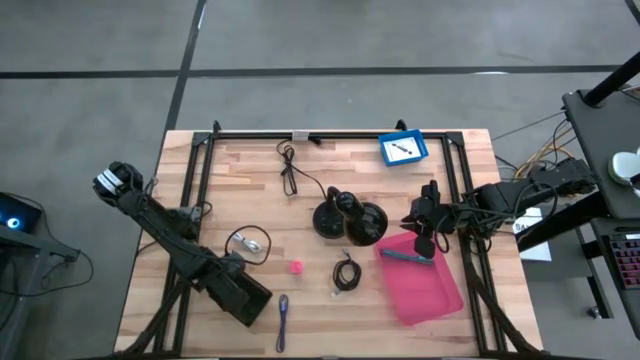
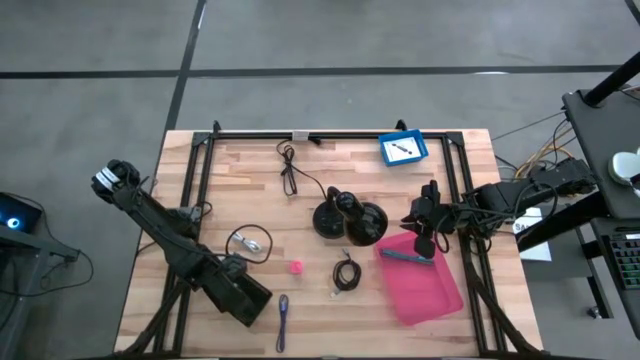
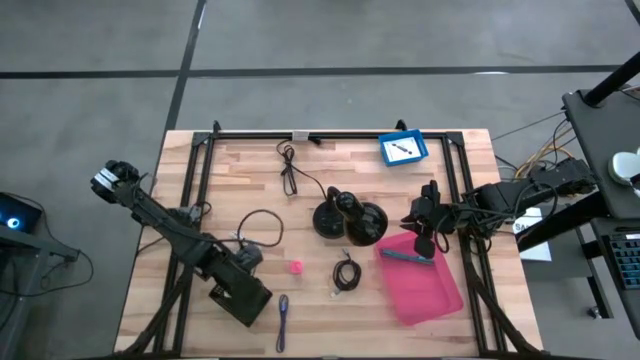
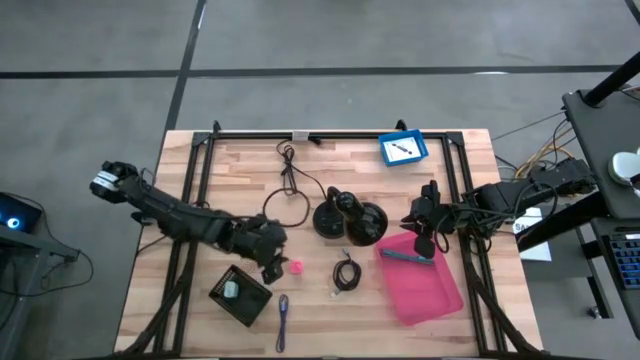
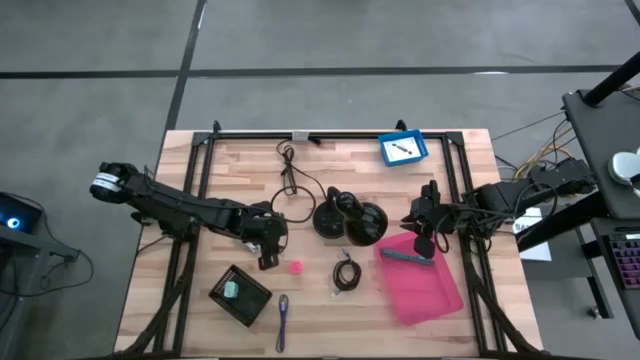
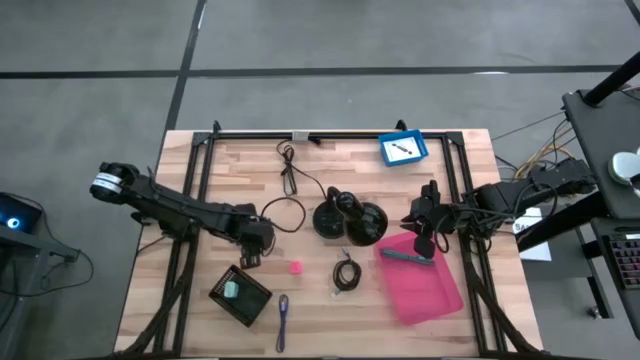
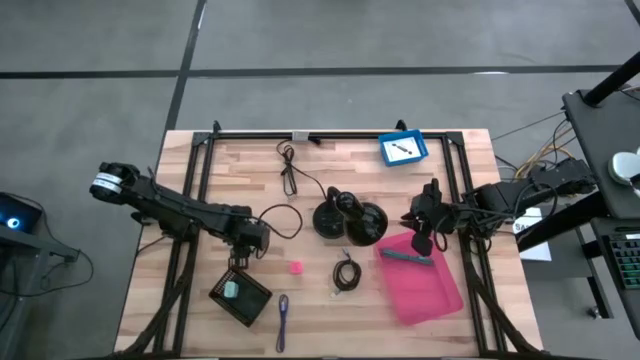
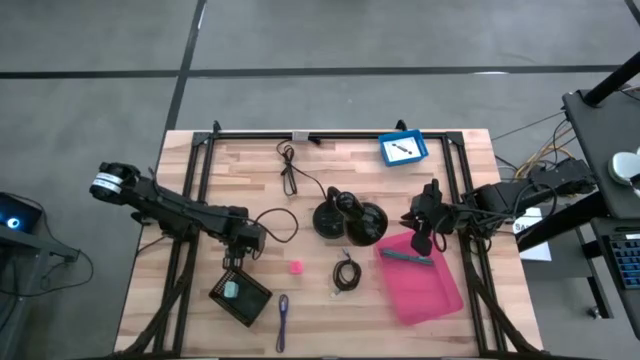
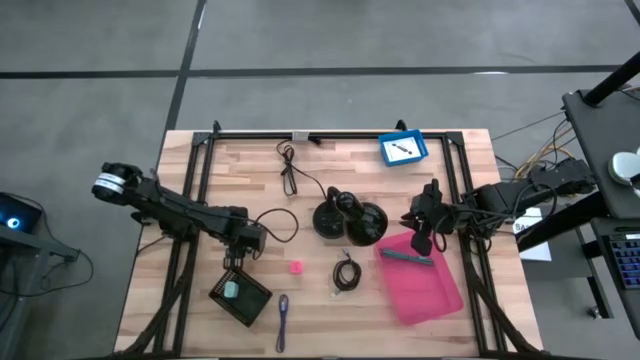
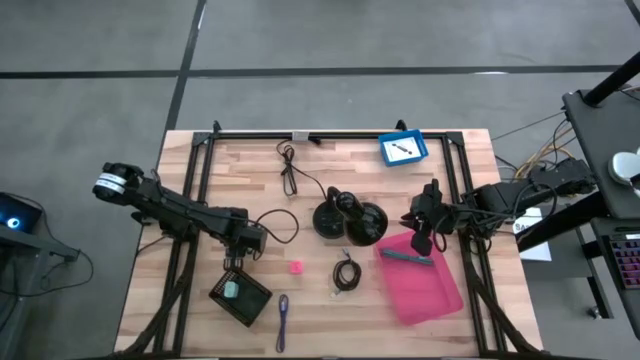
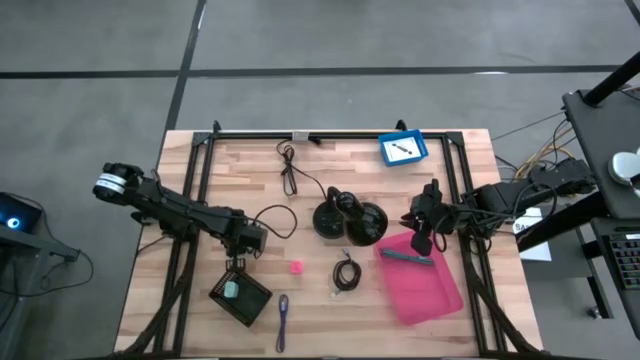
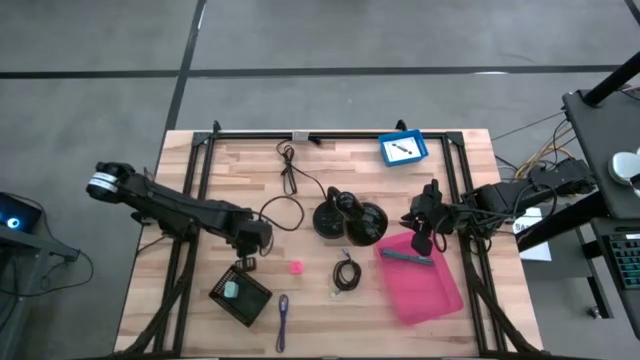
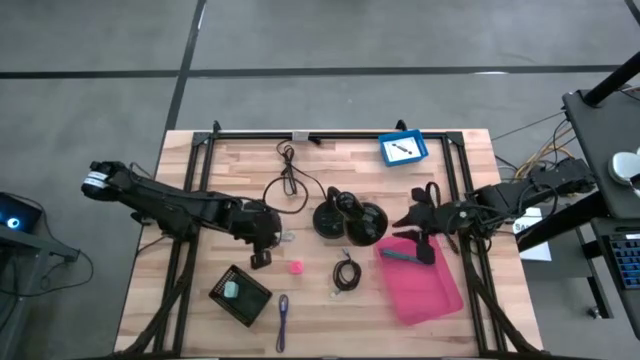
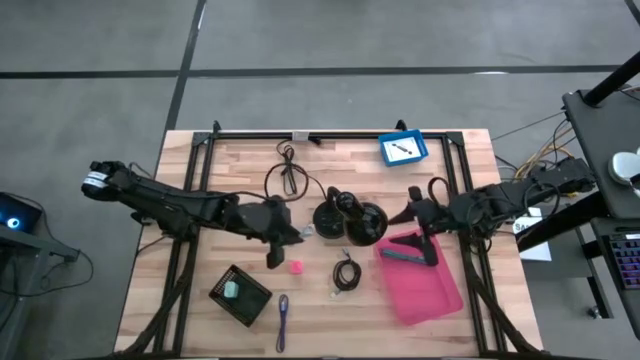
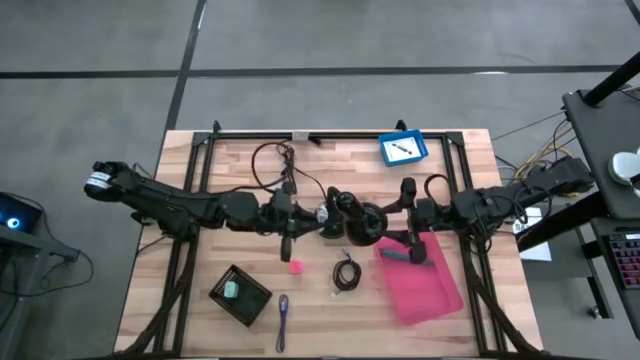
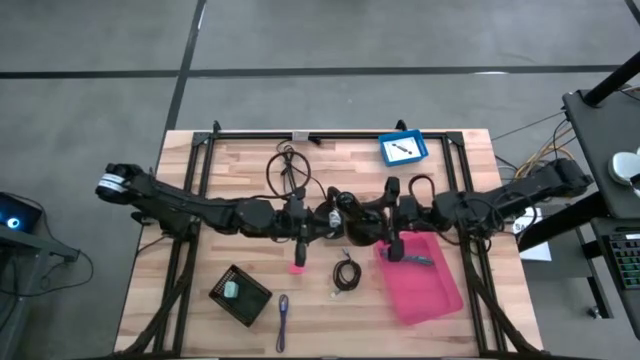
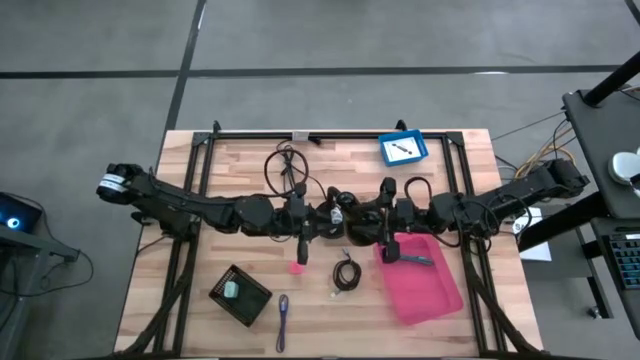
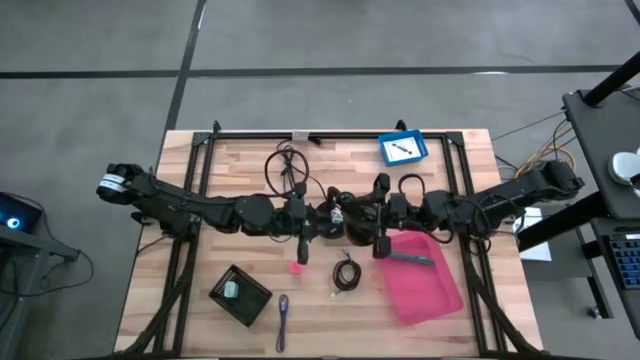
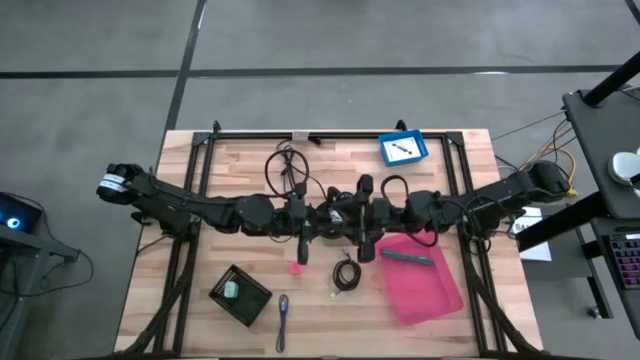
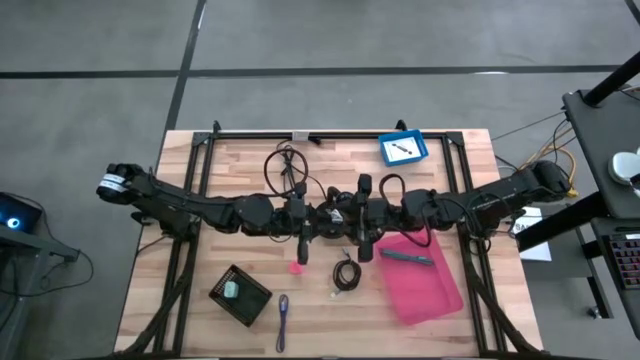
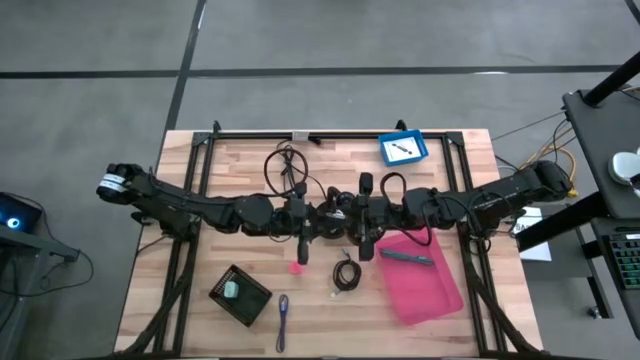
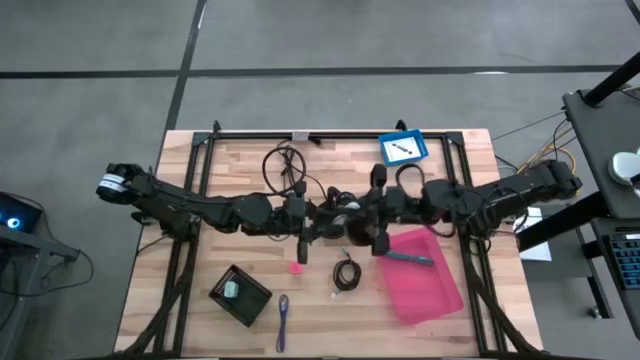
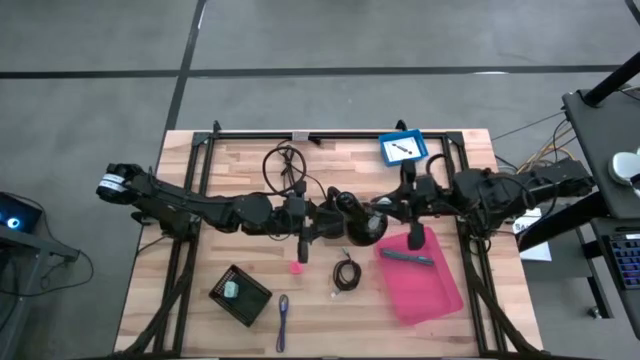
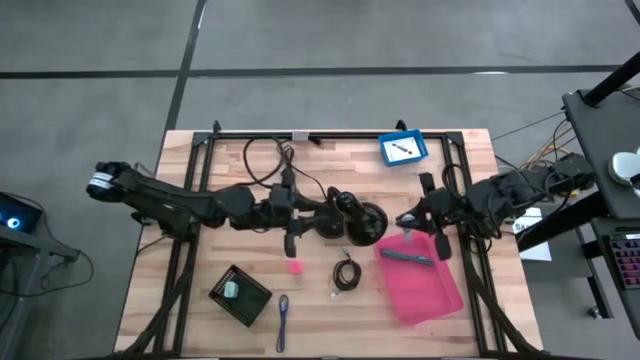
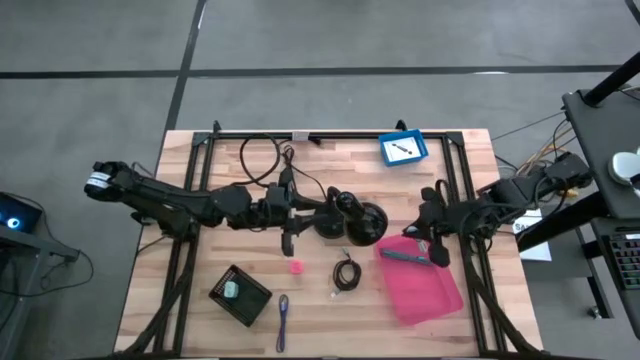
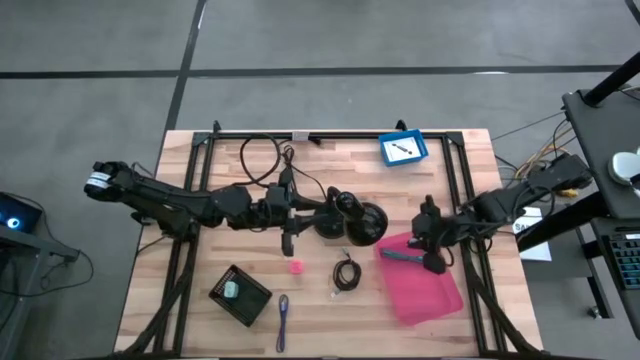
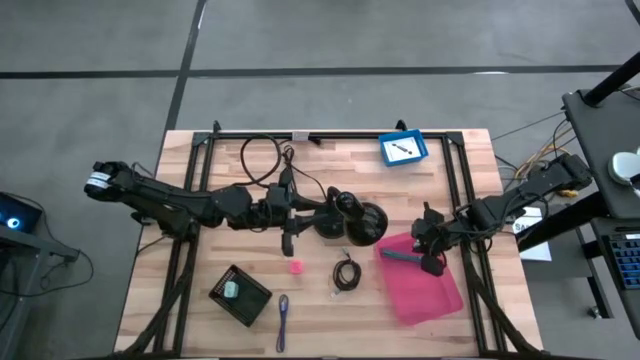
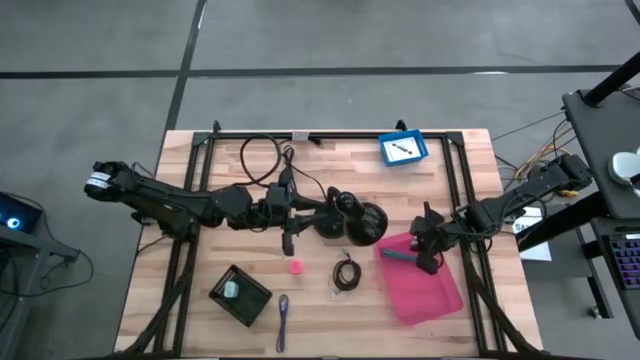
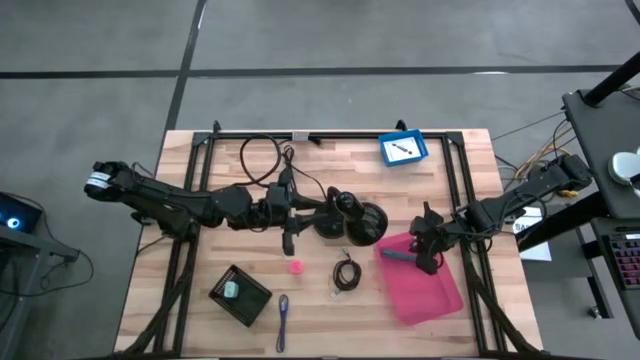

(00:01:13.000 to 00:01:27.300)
Task: Pick and place items into bin
Put the white charger cable into the pink bin

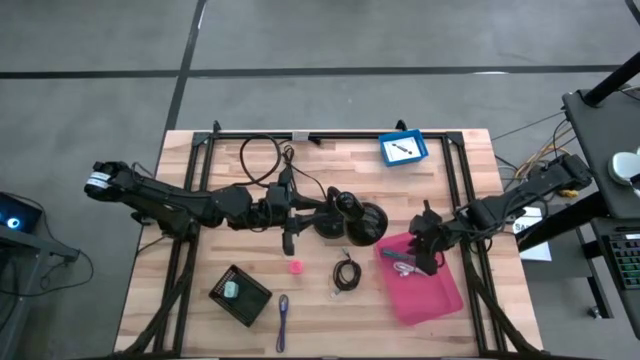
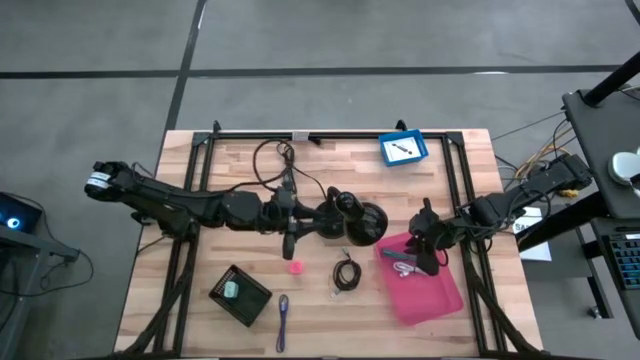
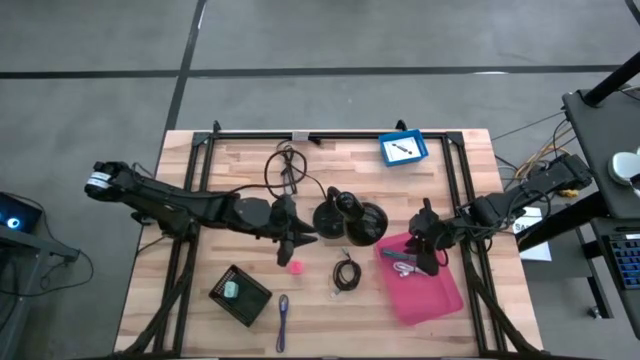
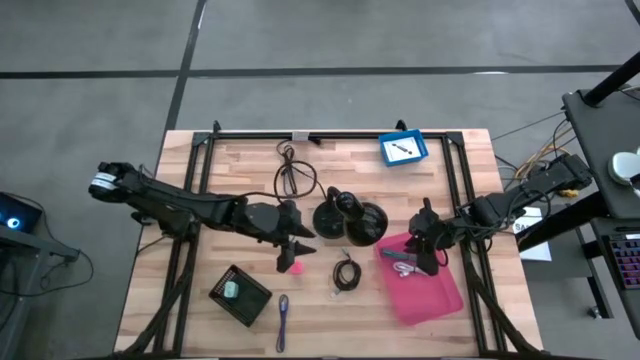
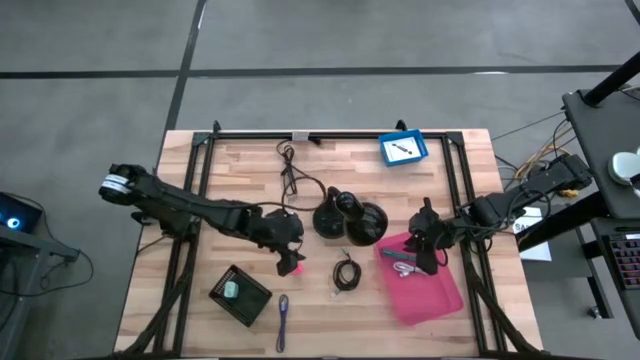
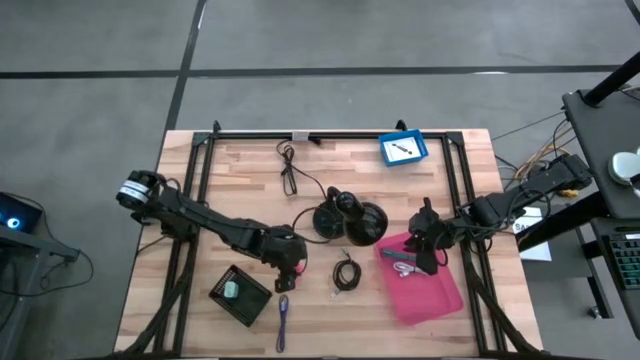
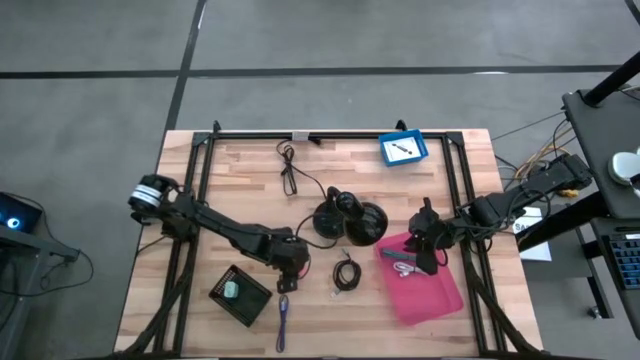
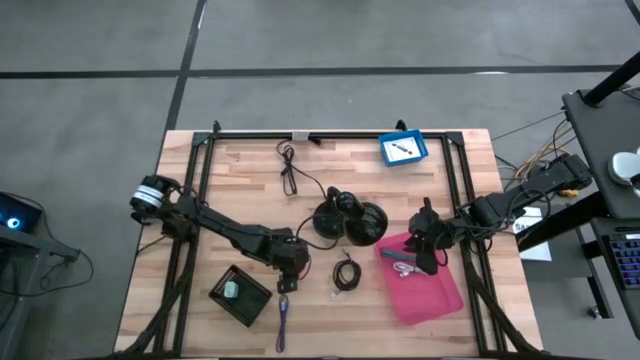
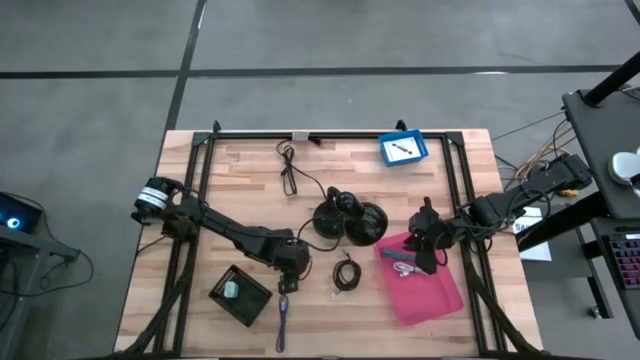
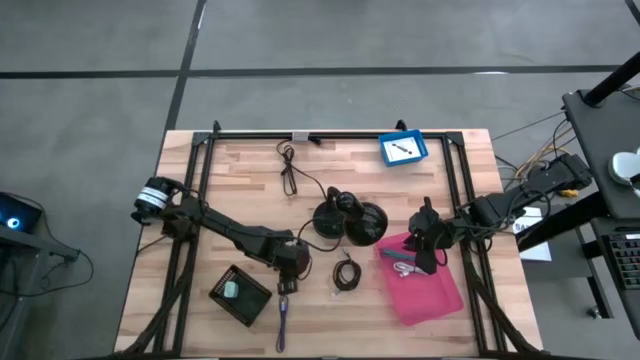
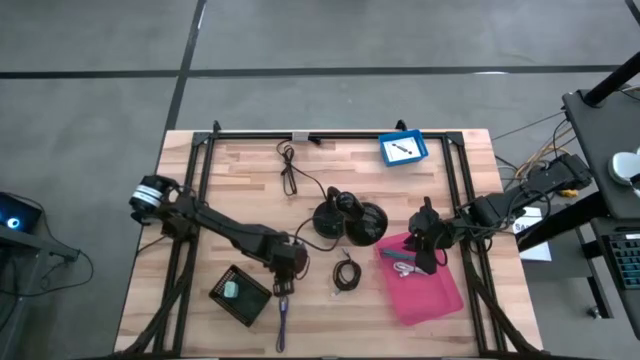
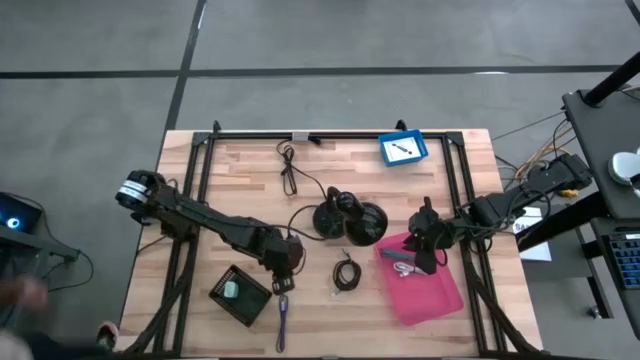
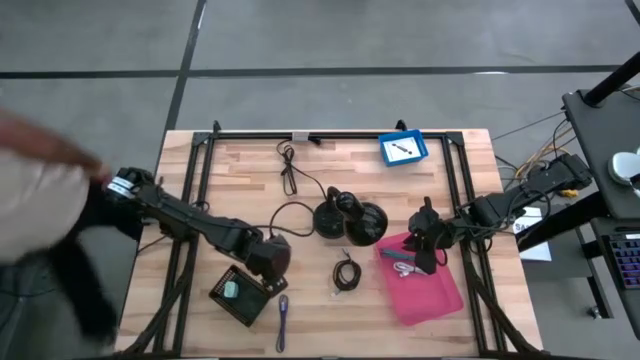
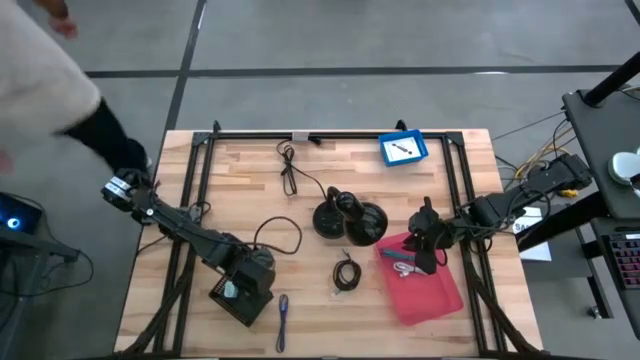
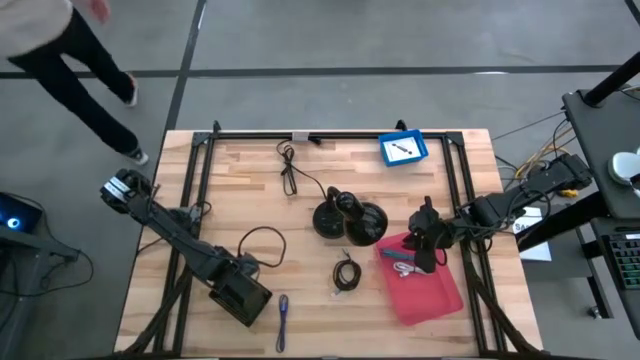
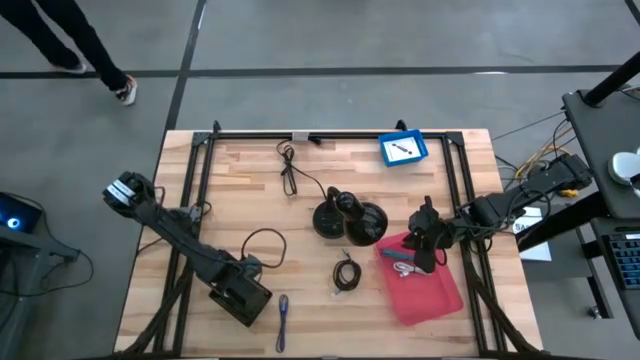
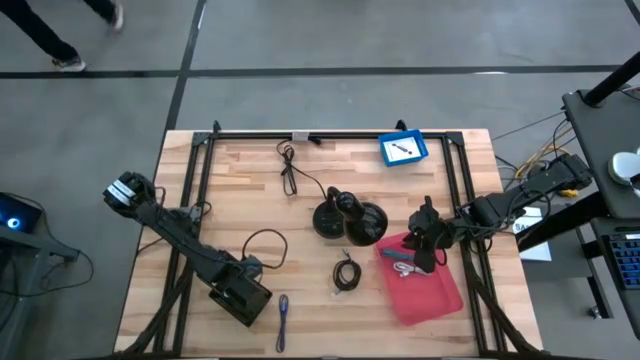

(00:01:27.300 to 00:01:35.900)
Put the pink charger adapter into the black bin
